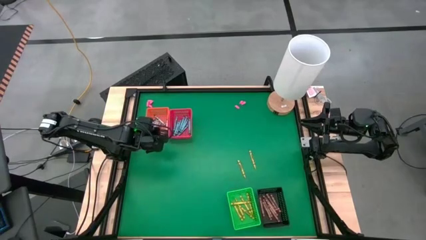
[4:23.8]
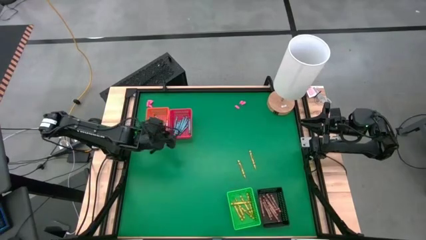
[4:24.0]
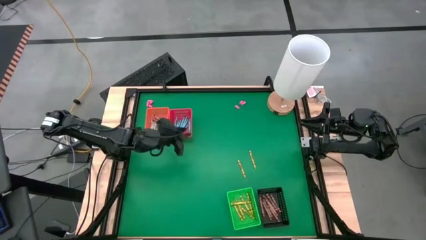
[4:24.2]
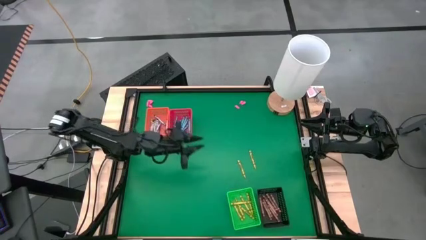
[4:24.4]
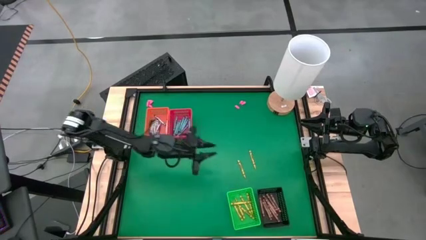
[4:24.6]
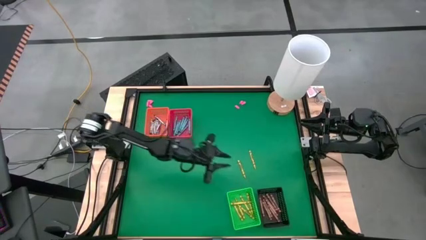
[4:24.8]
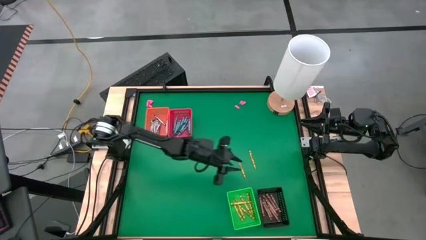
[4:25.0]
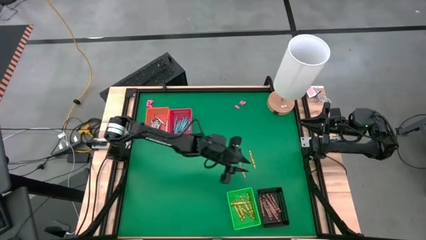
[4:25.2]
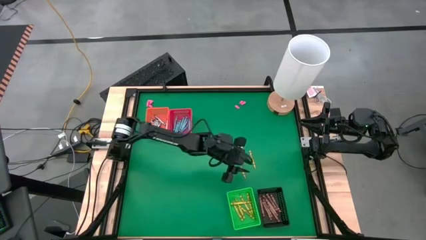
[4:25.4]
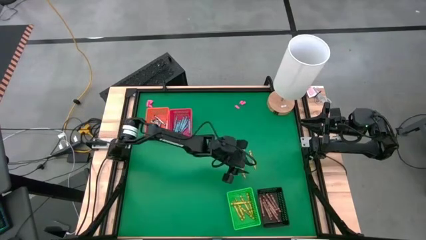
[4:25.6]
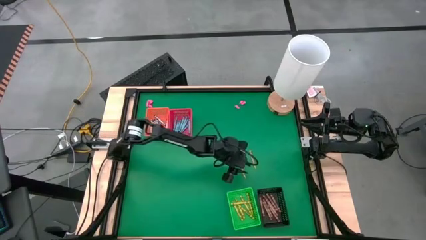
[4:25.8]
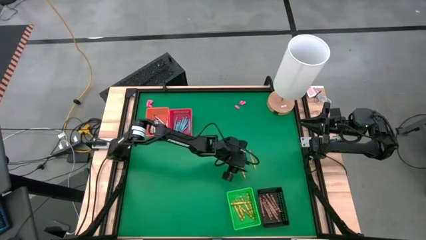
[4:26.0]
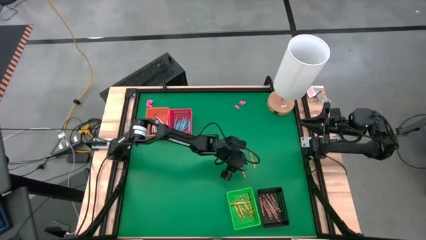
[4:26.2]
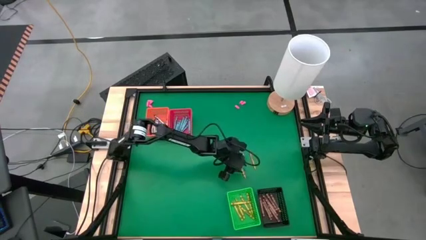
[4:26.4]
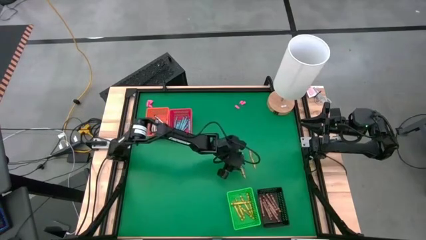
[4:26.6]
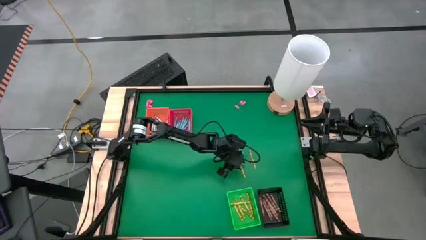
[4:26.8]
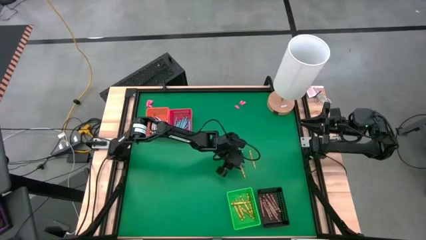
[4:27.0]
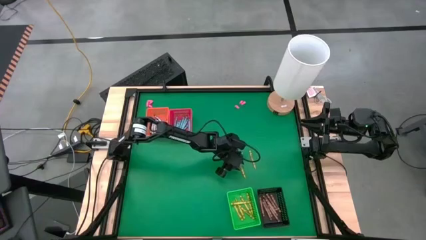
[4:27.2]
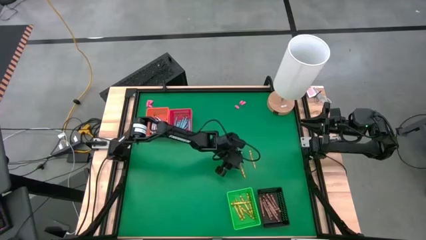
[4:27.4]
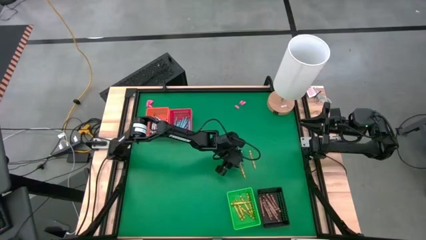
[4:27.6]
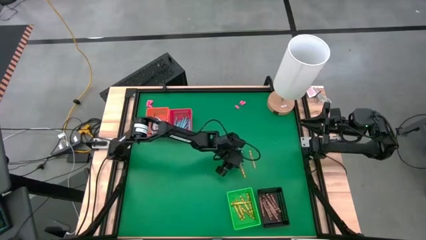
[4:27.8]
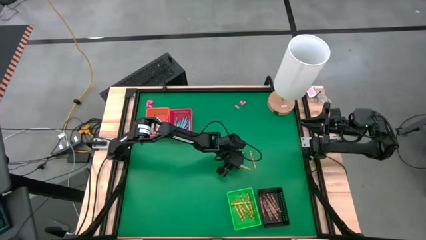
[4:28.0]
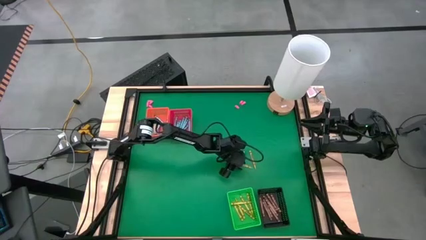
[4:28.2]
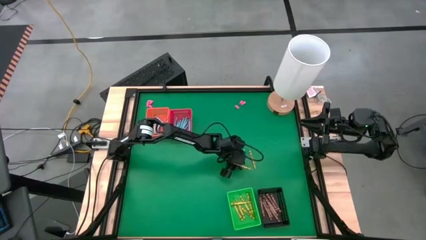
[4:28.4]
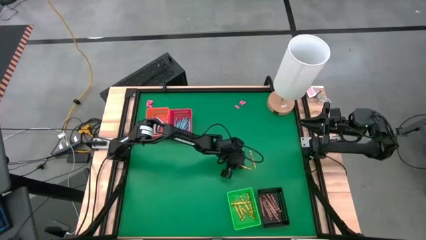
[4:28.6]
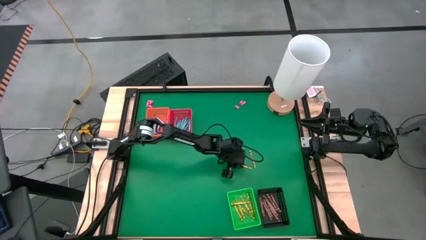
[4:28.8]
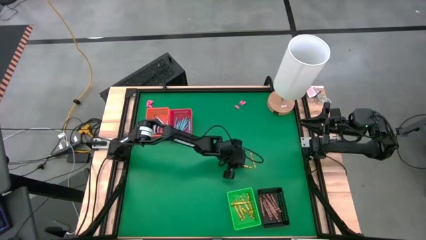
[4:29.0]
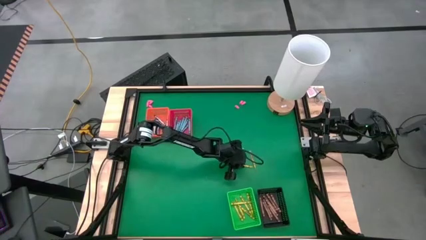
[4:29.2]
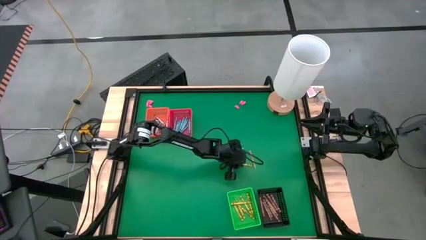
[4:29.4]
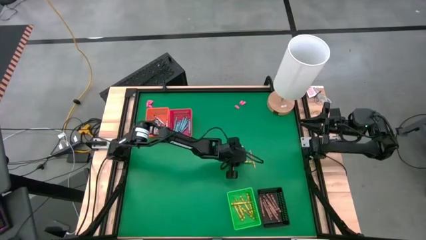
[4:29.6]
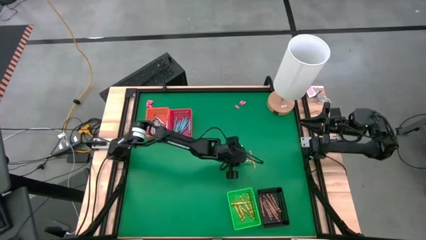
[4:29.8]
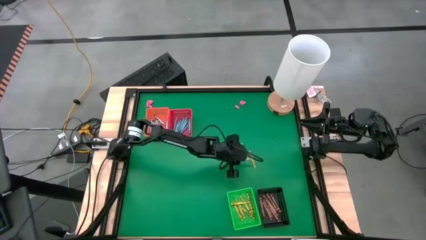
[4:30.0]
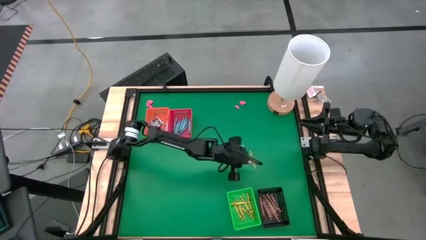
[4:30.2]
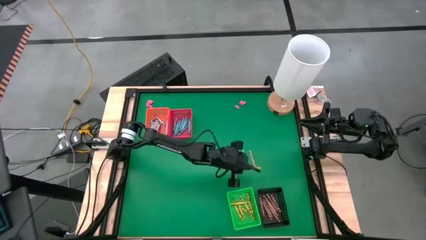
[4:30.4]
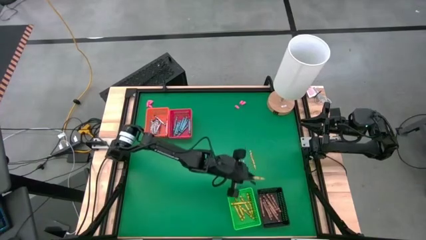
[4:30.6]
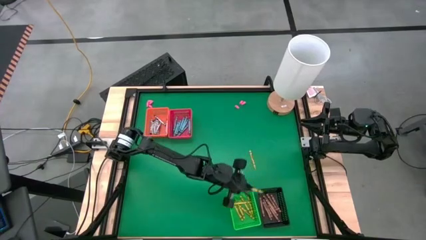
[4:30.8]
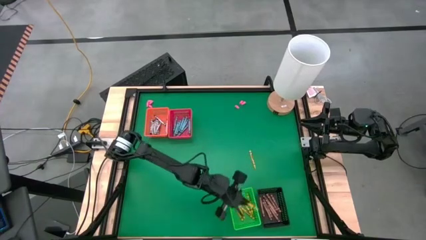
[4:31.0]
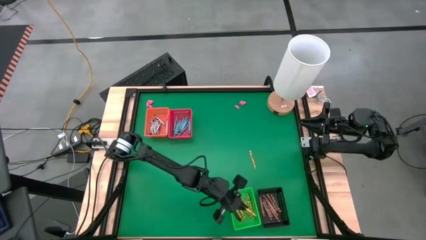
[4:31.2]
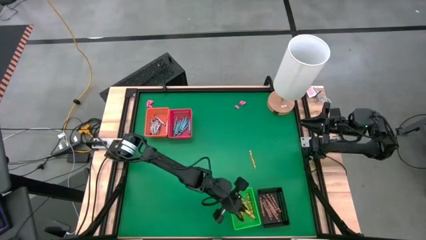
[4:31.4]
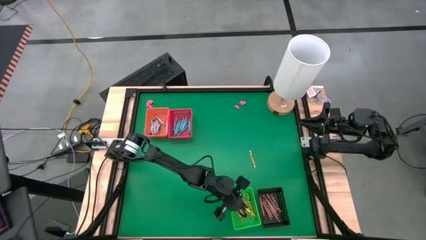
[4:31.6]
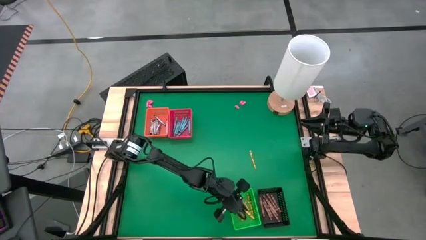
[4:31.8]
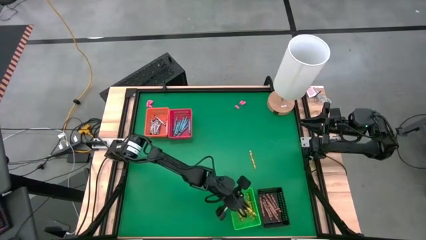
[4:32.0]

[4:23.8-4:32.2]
Task: Sort crayons
Put the yellow crayon into the green bin

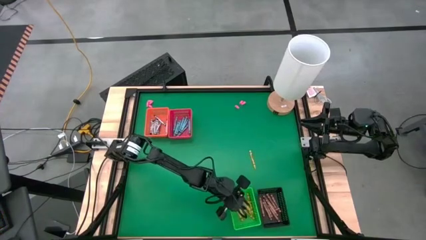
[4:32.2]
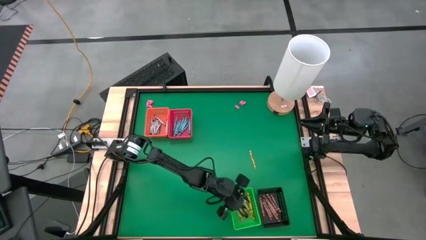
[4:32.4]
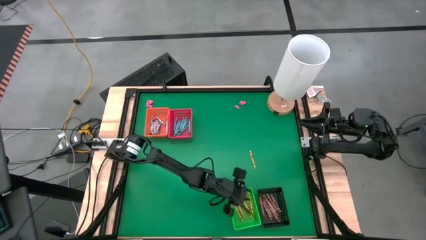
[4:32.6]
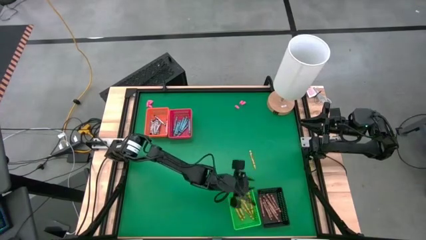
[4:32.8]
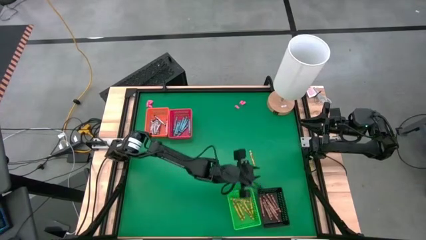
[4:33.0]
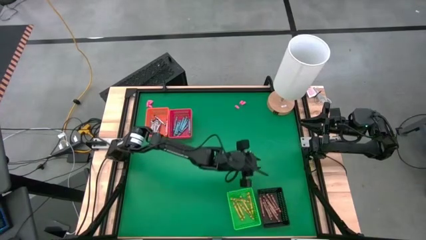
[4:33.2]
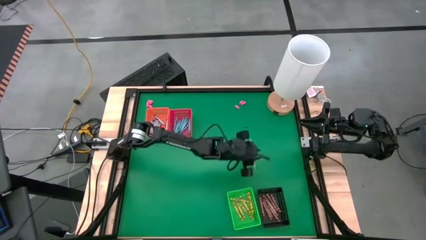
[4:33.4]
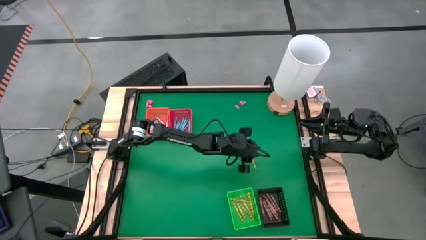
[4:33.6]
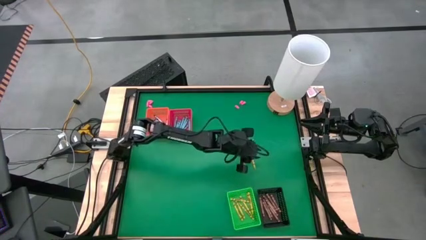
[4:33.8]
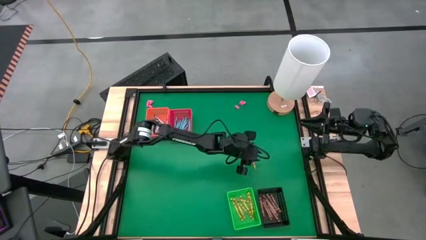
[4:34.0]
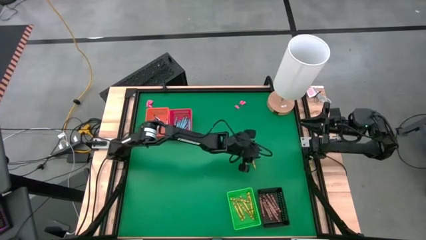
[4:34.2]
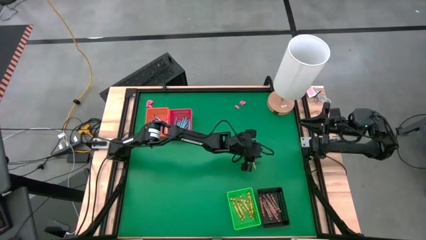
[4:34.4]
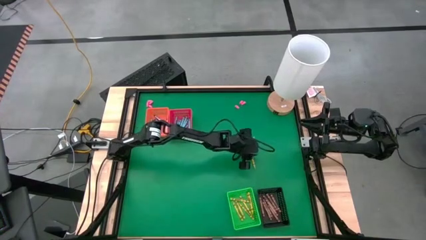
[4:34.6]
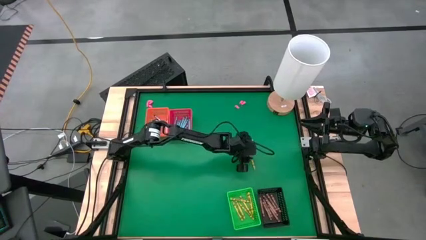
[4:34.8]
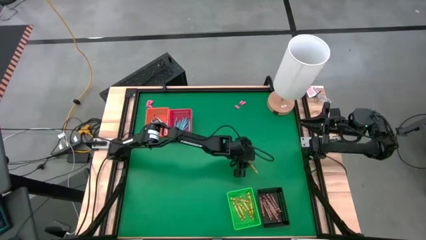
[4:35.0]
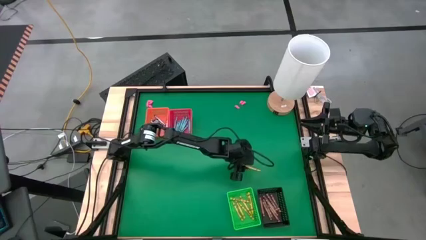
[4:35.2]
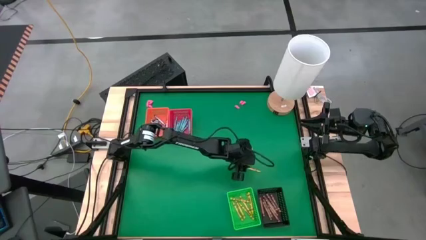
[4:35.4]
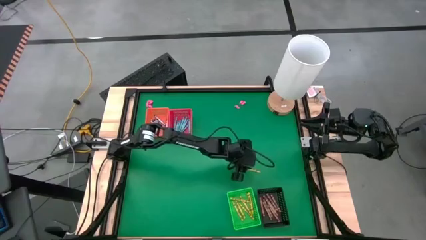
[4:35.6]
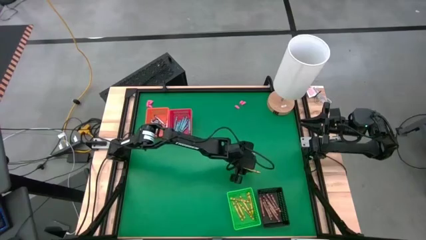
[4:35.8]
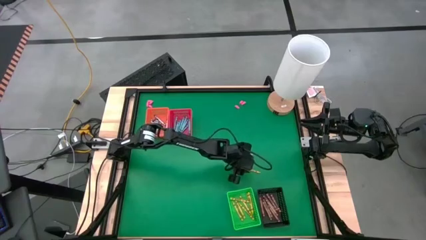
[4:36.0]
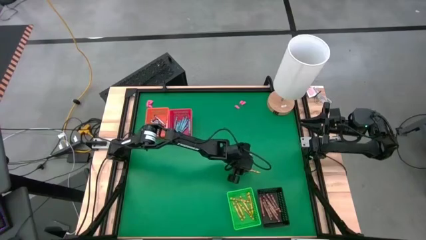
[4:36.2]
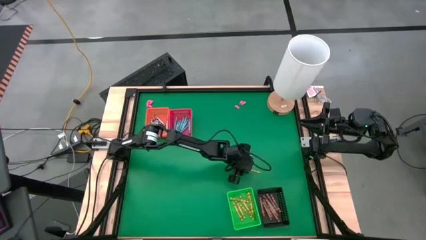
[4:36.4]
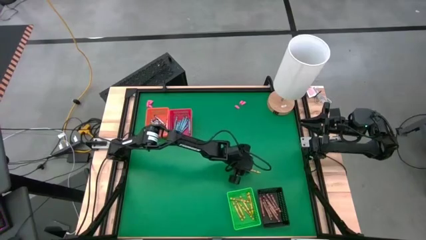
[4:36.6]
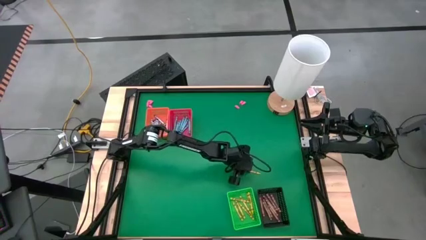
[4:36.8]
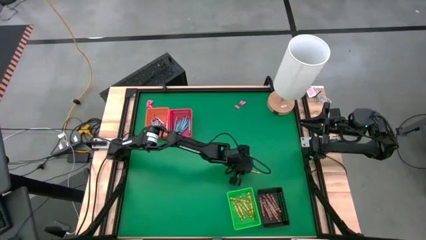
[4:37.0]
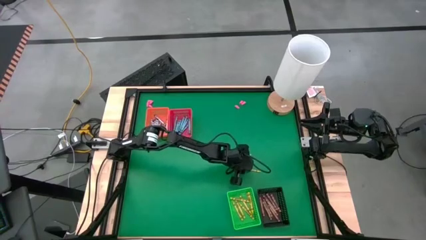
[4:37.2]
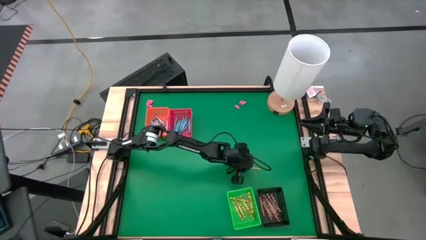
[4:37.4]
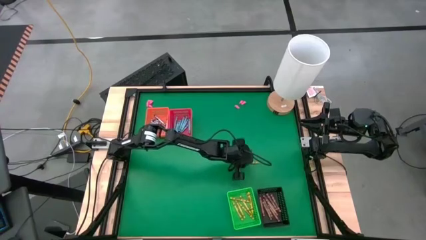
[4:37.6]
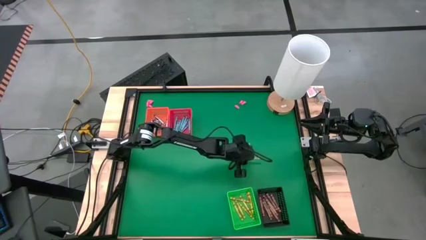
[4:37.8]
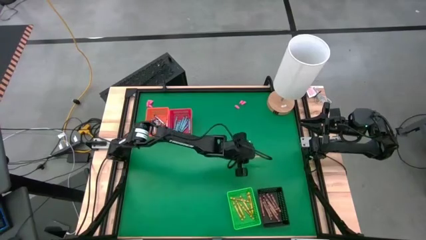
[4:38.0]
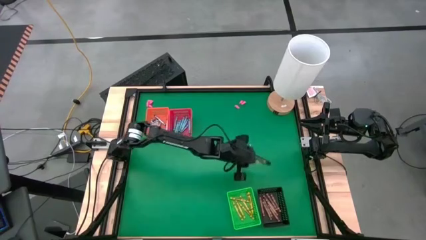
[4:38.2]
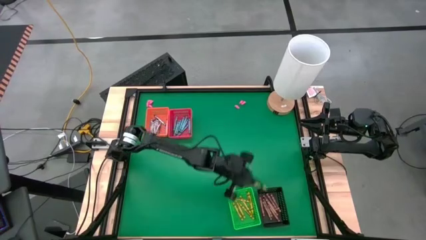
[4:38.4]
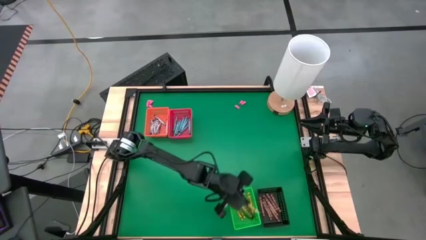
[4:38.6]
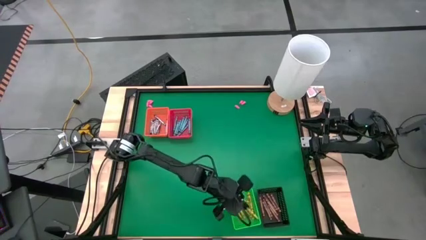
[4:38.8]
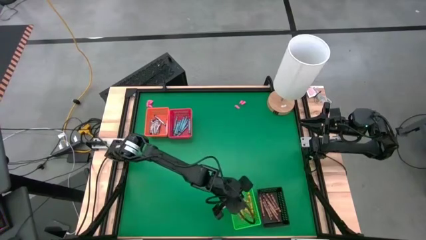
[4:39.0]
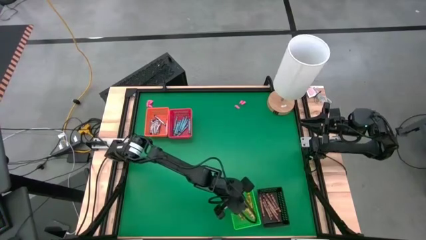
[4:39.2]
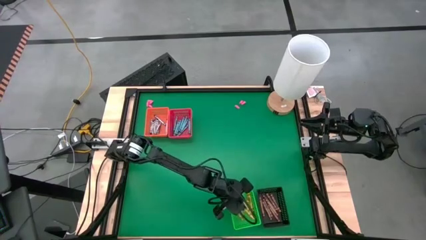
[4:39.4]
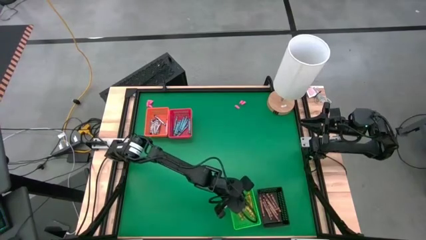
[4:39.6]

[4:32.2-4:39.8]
Put the yellow crayon into the green bin
